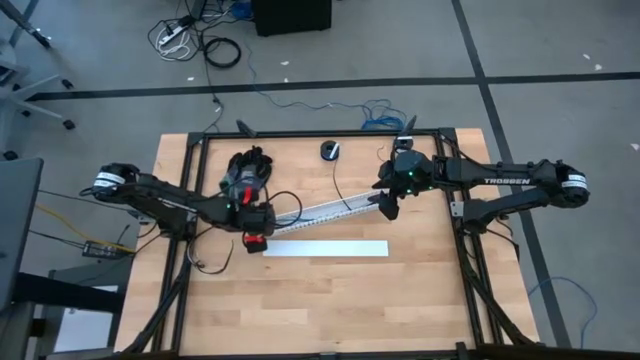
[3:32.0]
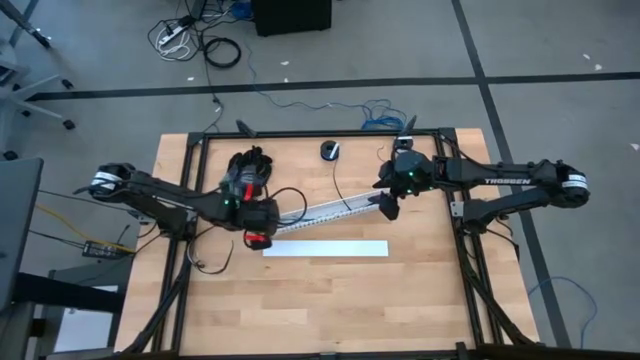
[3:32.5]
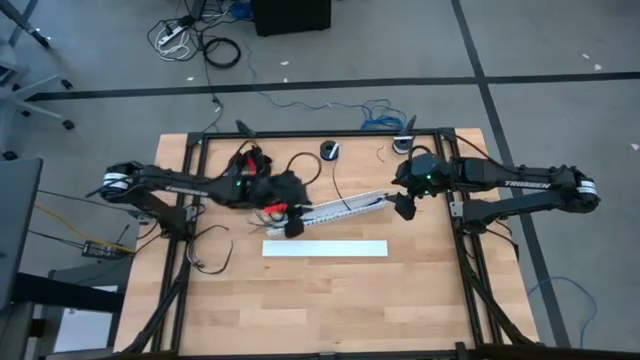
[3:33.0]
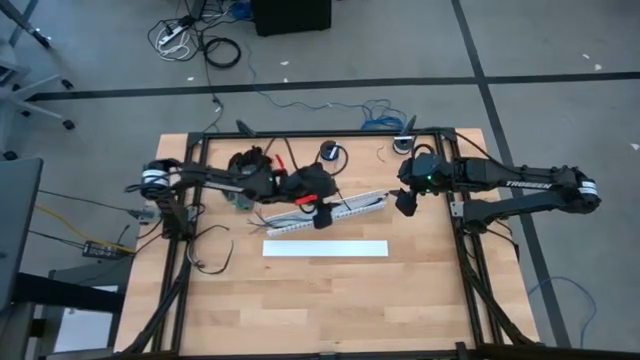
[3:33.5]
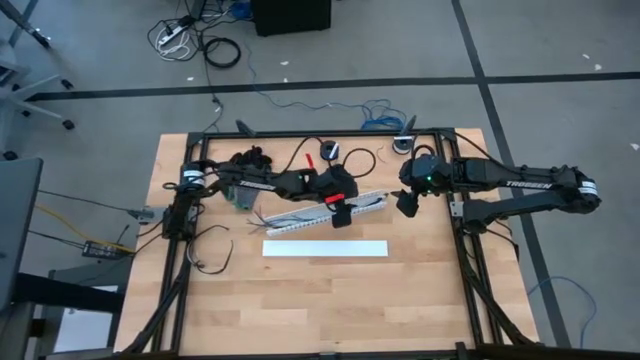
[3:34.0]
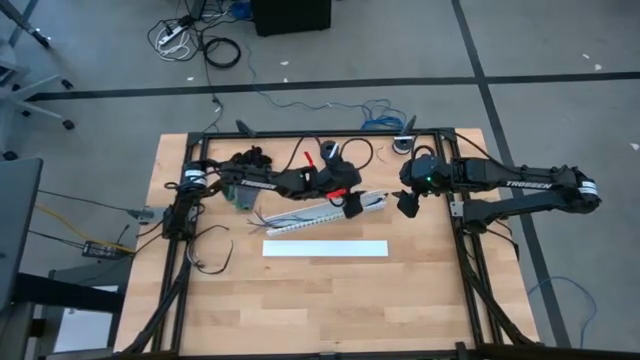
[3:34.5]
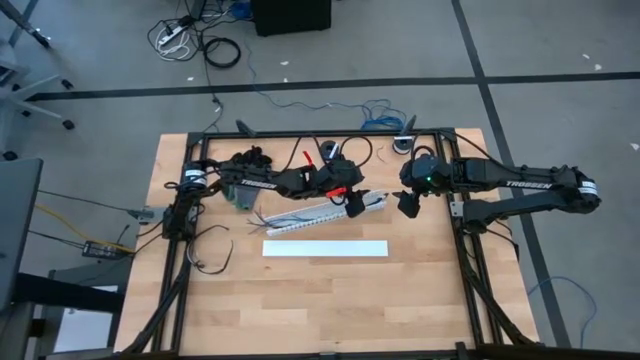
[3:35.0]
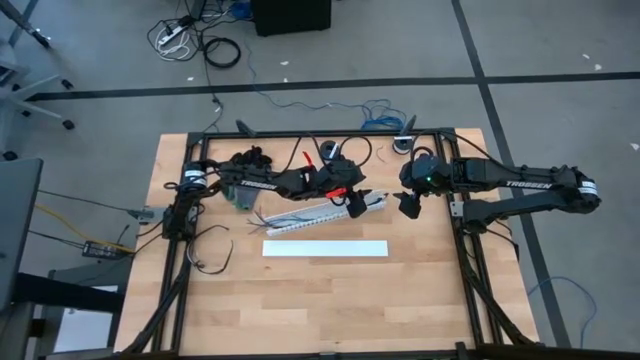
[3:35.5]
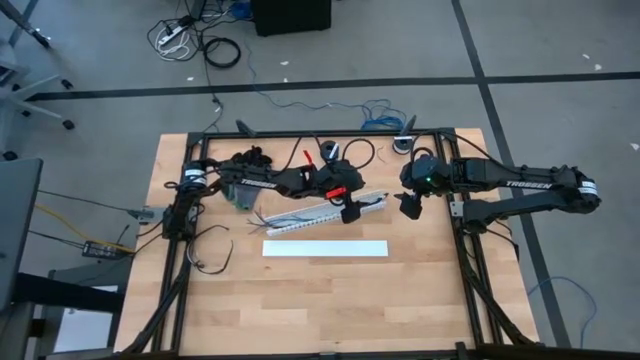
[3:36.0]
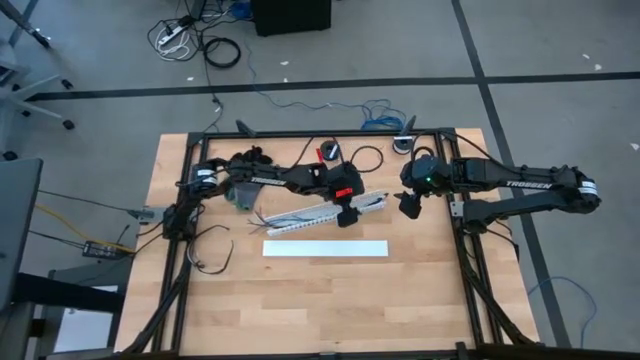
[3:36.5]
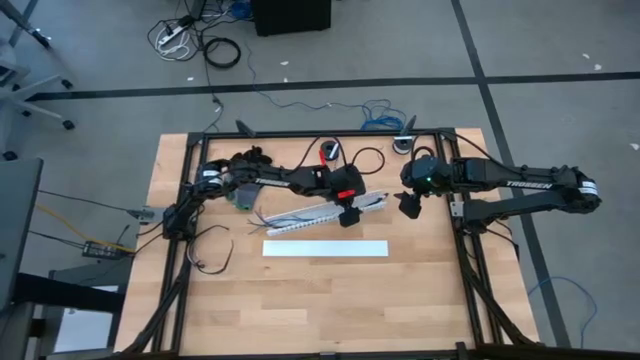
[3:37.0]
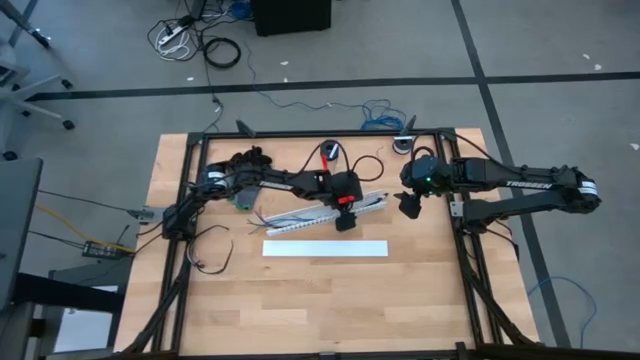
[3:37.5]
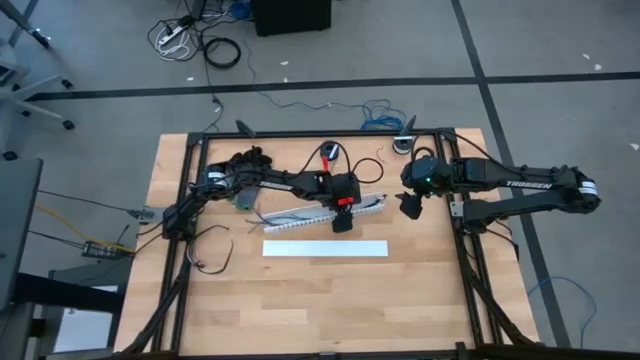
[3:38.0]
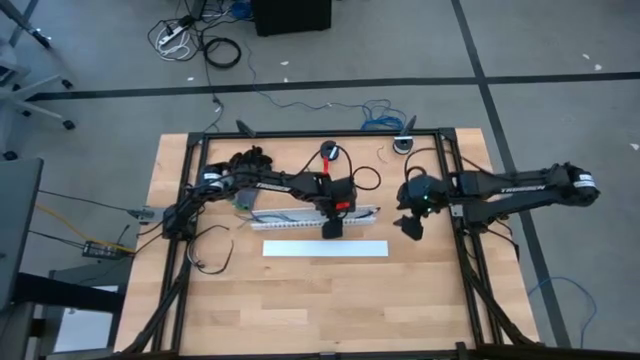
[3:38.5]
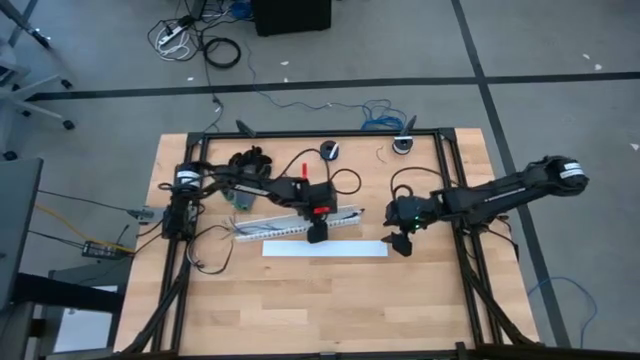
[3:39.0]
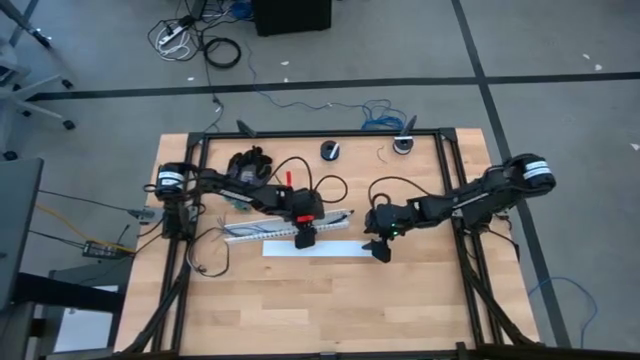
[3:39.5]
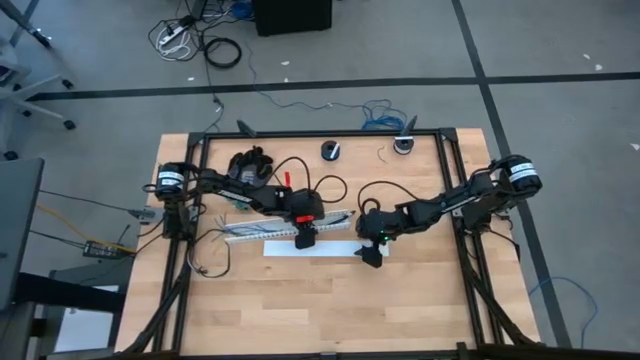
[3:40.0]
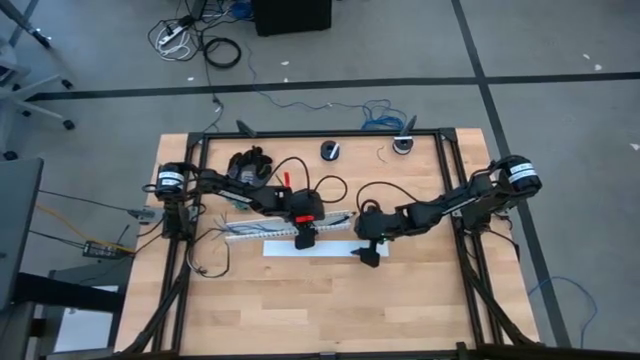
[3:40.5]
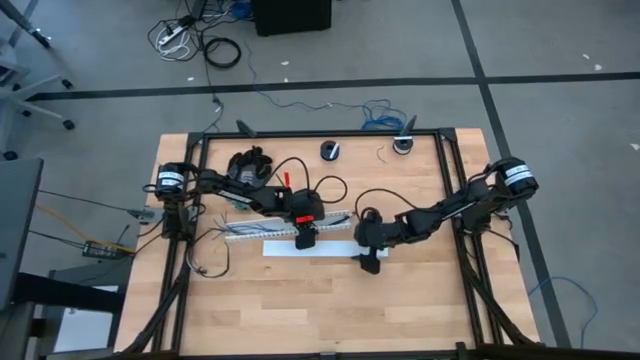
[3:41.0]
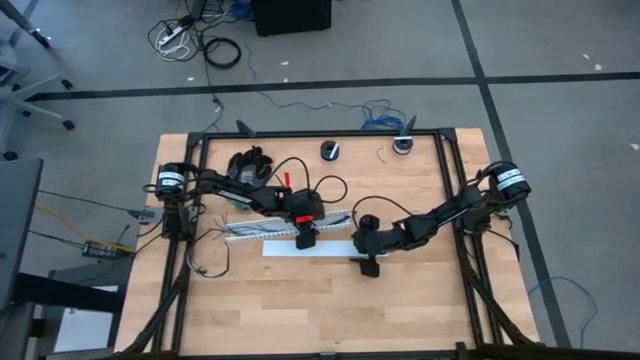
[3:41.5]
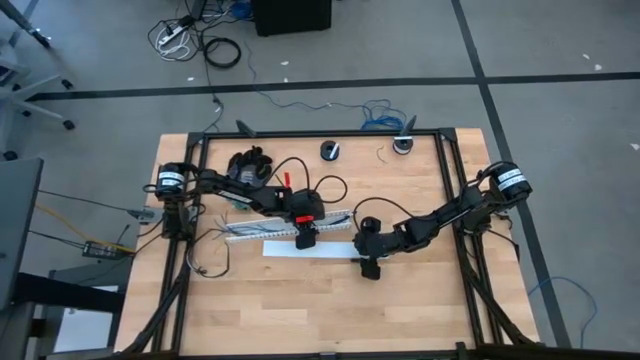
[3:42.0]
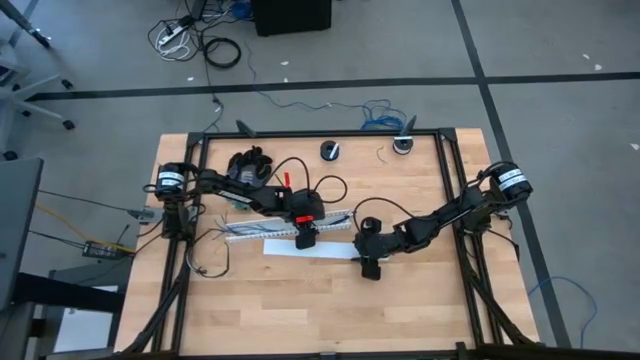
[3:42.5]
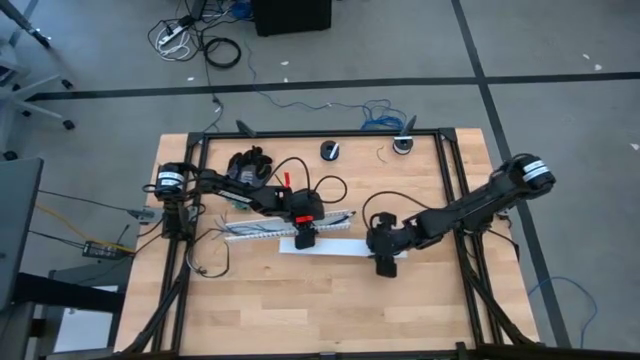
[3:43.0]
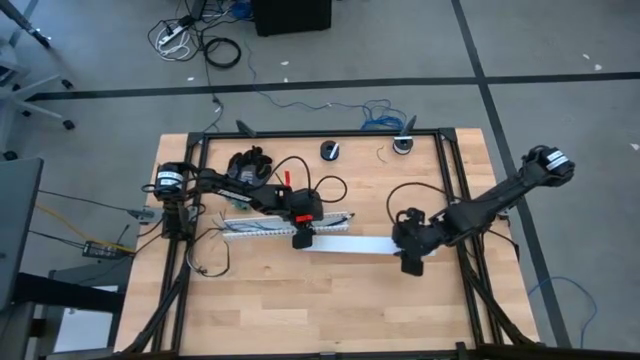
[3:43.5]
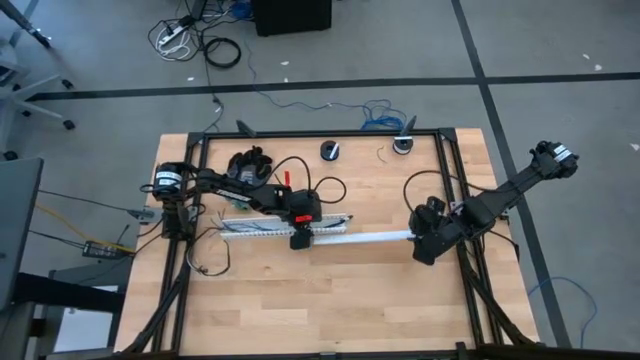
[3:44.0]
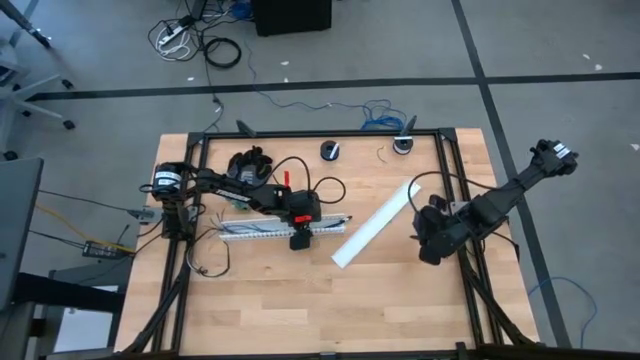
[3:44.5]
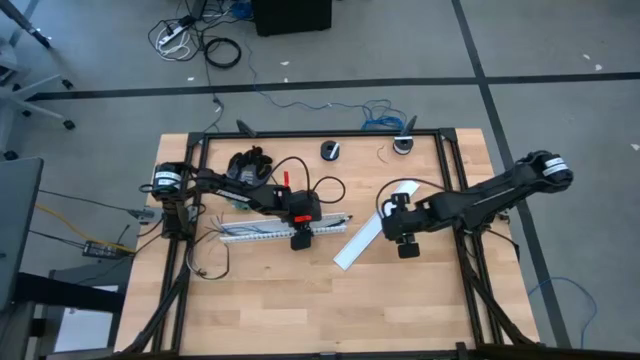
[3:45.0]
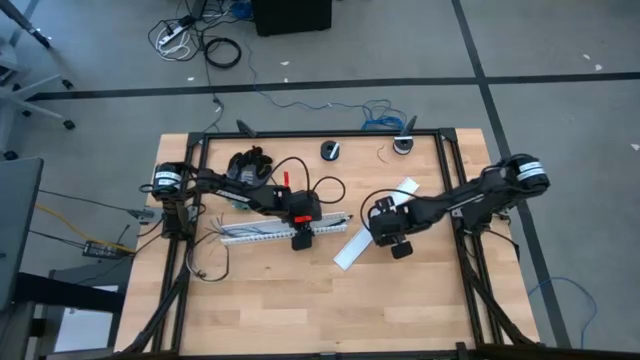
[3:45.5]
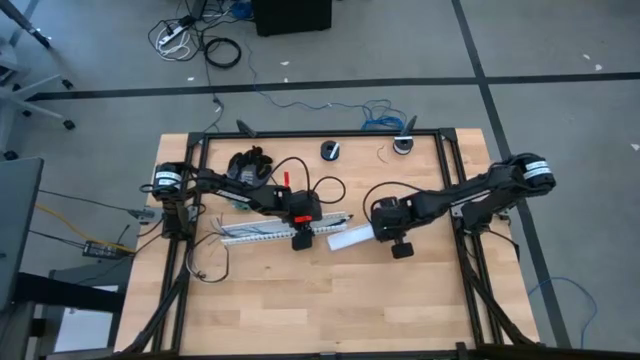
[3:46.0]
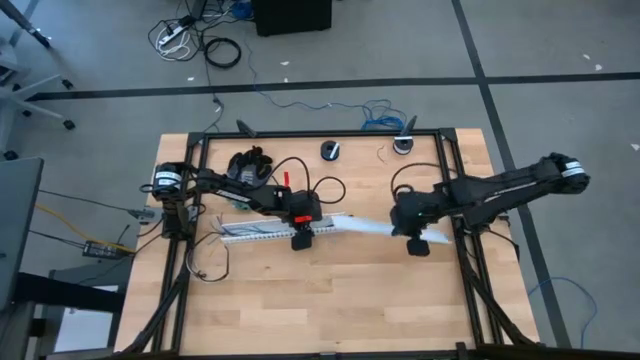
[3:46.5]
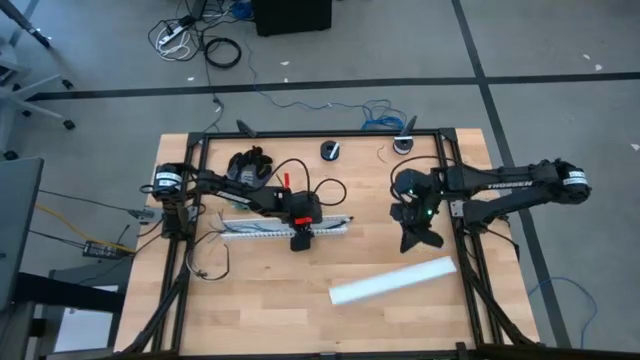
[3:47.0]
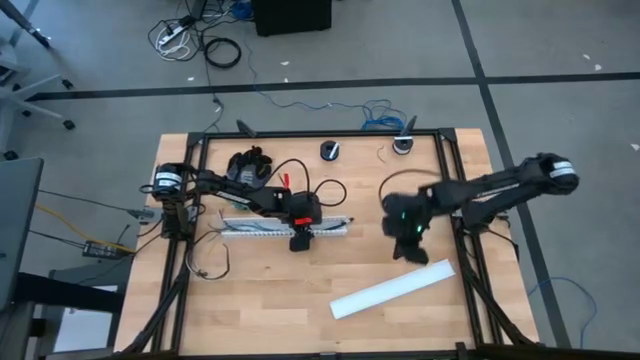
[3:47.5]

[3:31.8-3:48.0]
Task: Ziptie cables
Close the white cable duct

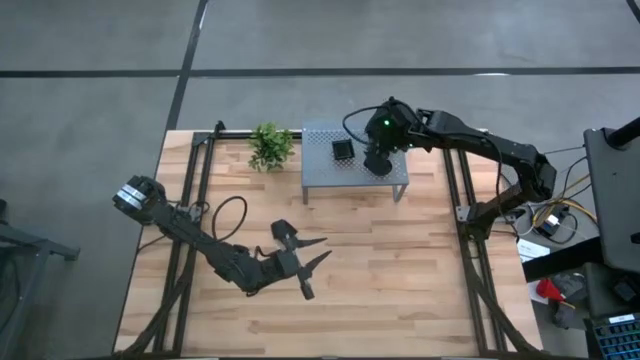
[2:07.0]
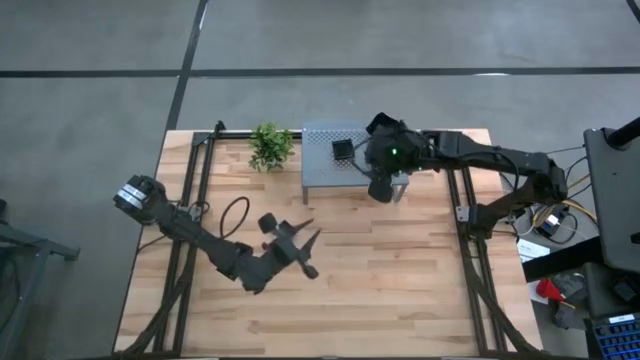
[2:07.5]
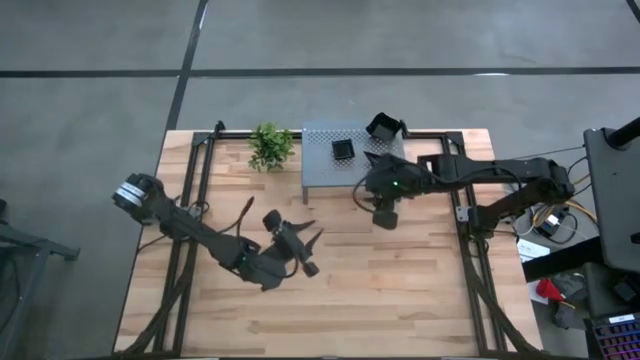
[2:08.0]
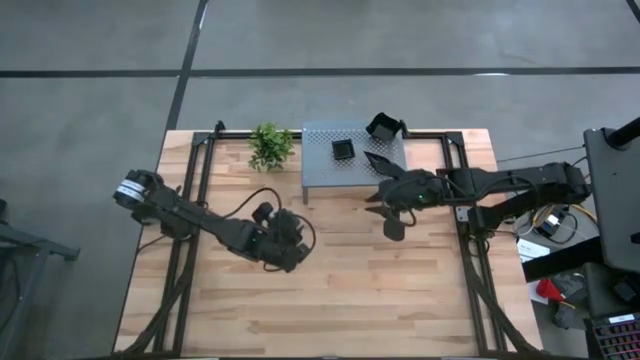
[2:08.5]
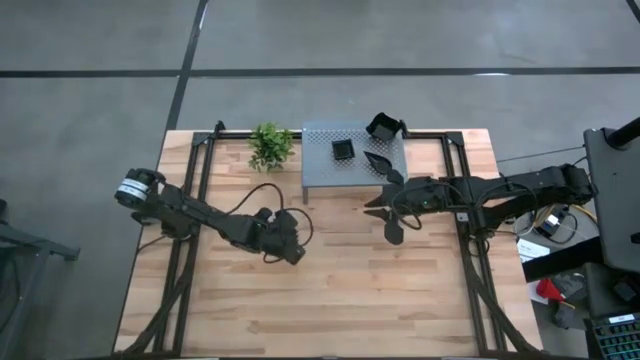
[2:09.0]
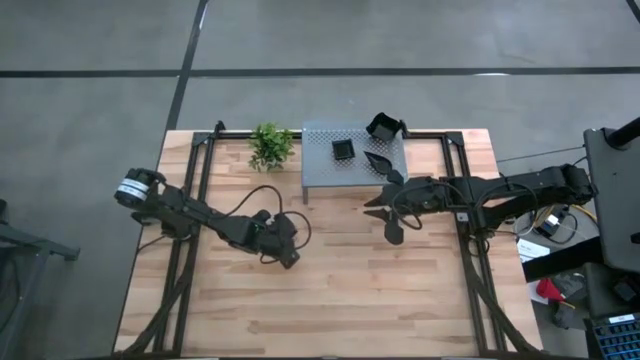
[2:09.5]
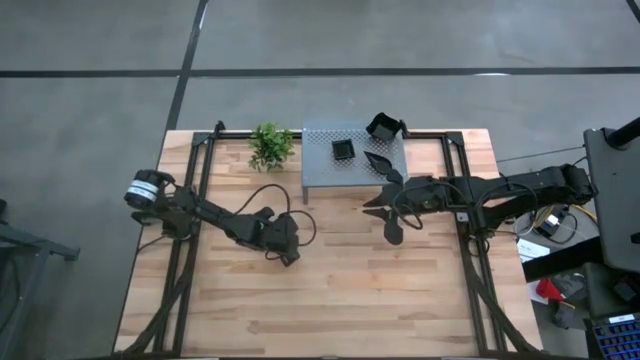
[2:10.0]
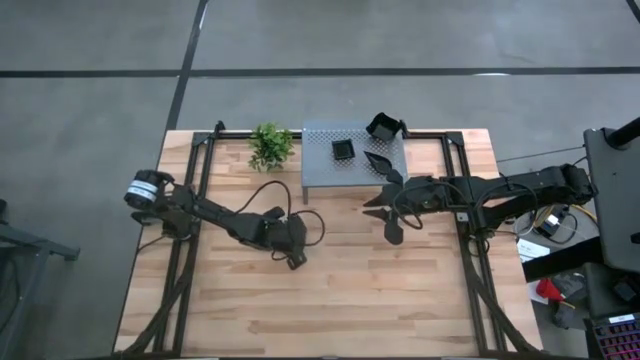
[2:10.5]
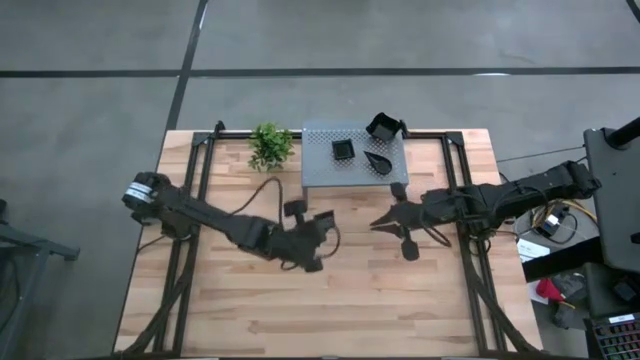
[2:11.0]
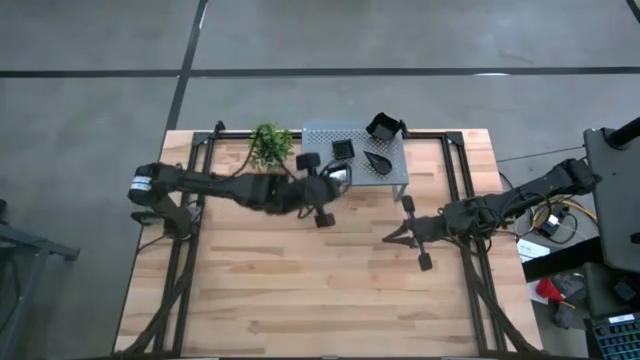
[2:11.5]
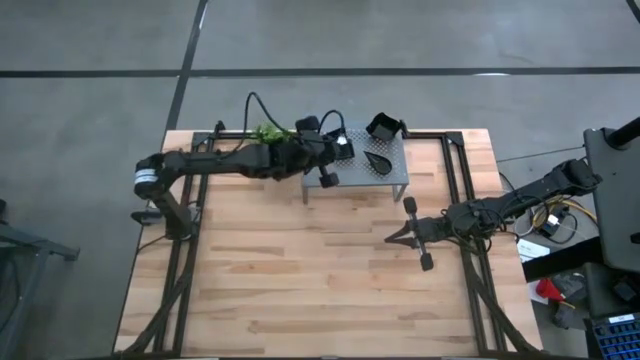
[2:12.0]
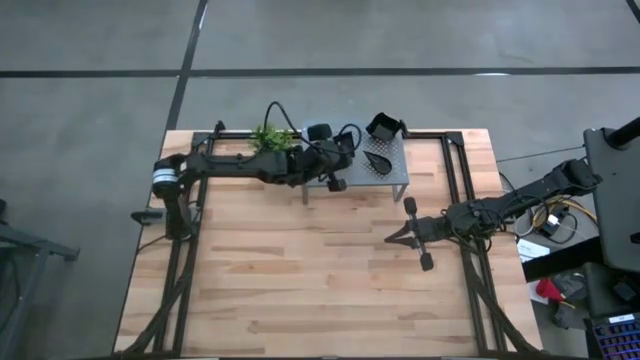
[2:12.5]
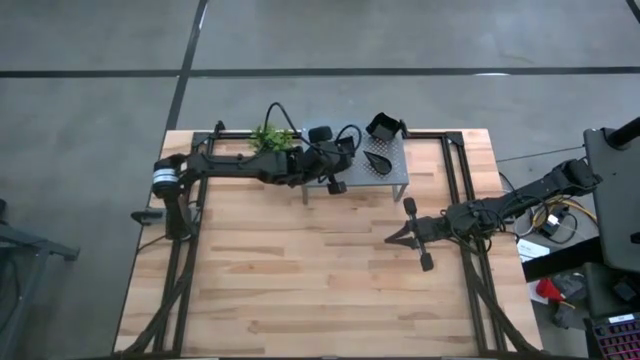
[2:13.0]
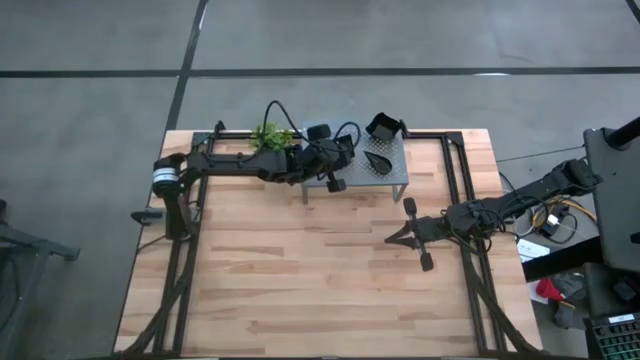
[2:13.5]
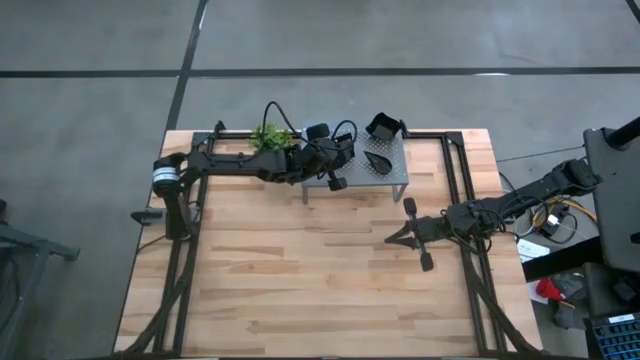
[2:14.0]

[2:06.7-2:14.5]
Task: Pick & Place Mini shaped plates
Stack the square plate on top of the other square plate on the shelf
